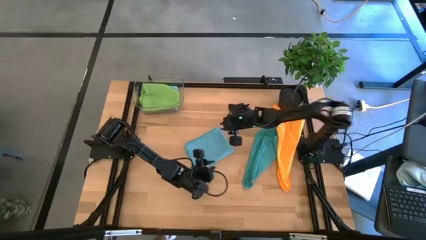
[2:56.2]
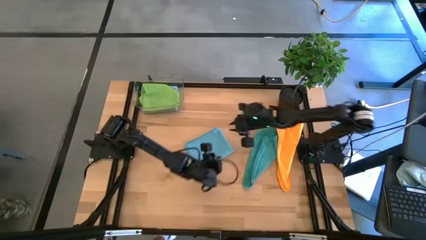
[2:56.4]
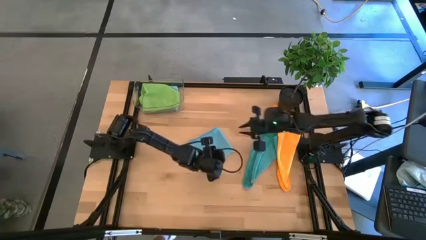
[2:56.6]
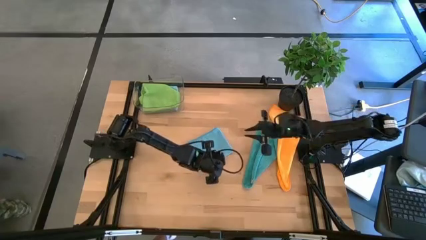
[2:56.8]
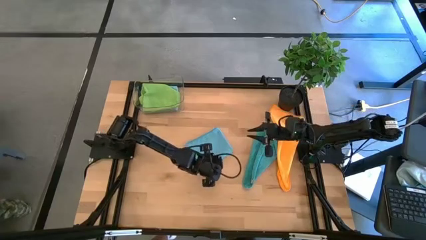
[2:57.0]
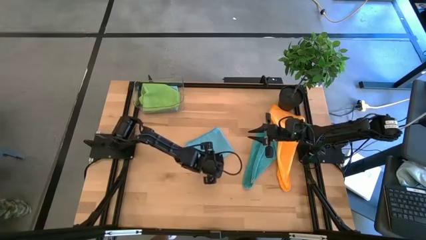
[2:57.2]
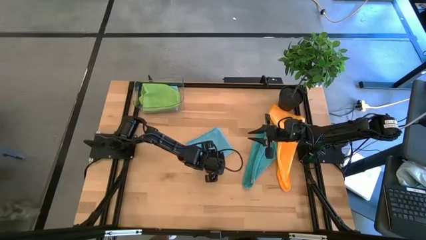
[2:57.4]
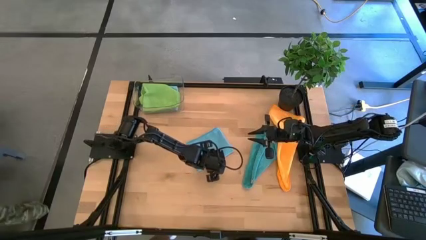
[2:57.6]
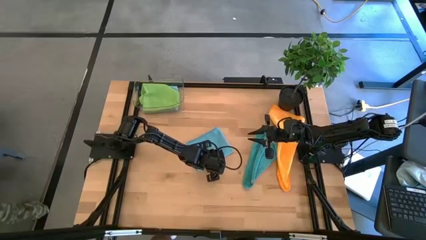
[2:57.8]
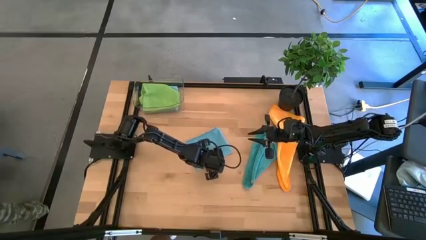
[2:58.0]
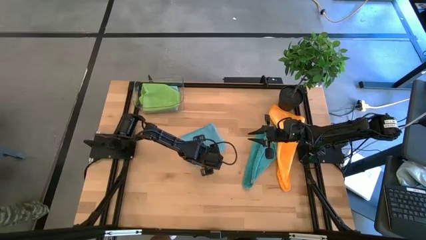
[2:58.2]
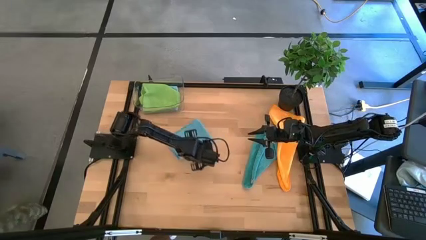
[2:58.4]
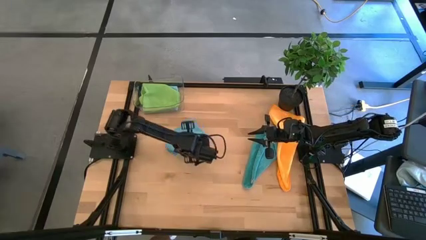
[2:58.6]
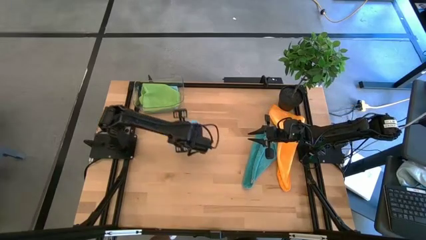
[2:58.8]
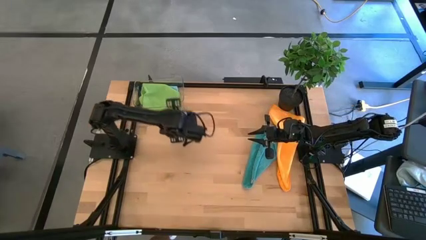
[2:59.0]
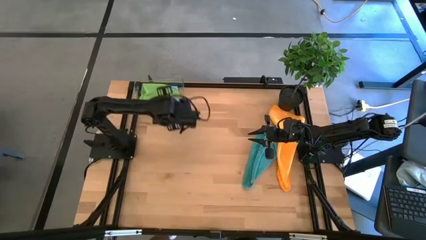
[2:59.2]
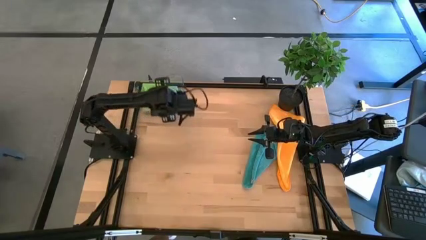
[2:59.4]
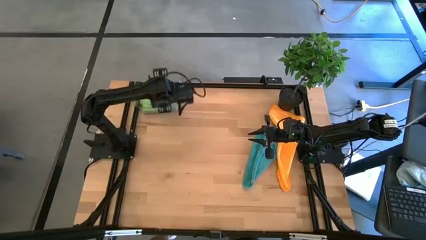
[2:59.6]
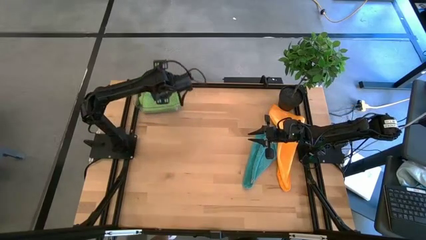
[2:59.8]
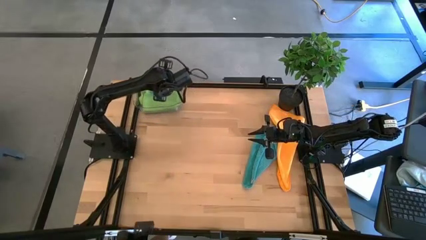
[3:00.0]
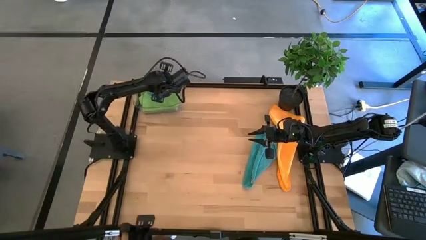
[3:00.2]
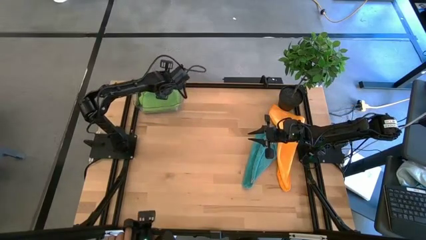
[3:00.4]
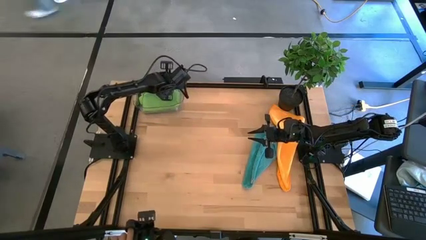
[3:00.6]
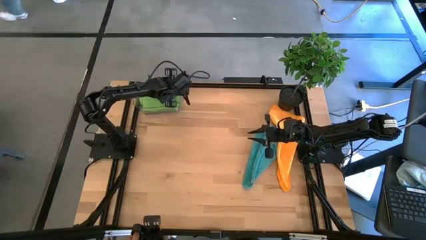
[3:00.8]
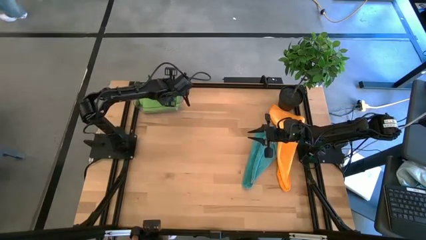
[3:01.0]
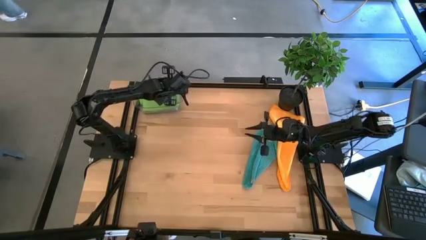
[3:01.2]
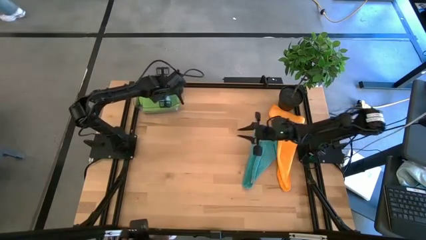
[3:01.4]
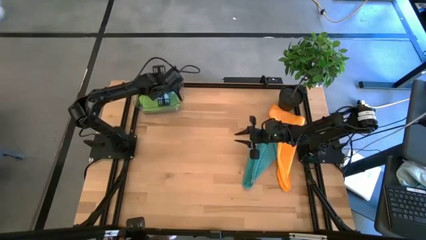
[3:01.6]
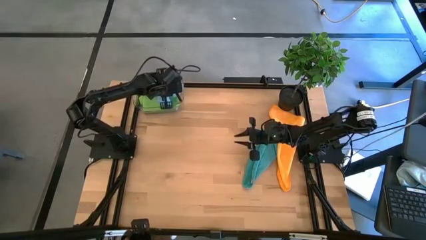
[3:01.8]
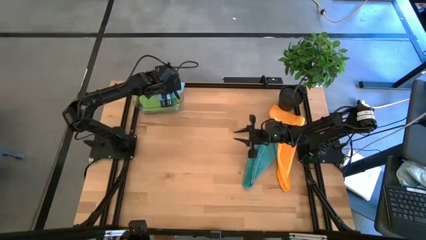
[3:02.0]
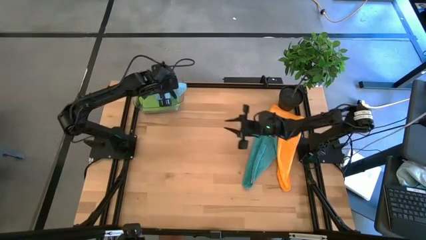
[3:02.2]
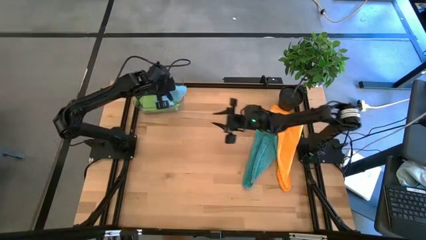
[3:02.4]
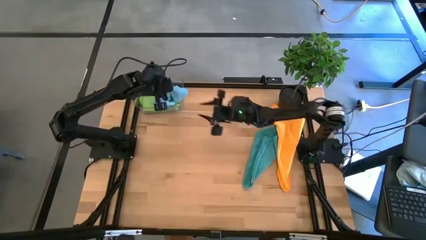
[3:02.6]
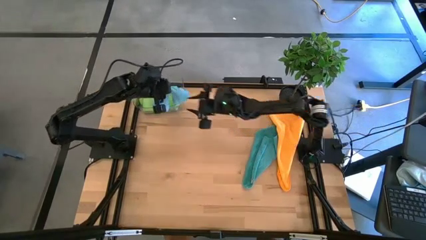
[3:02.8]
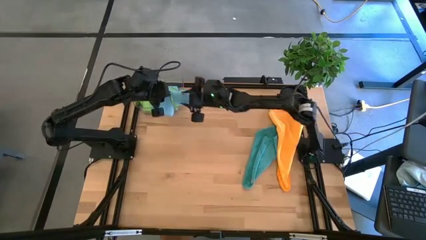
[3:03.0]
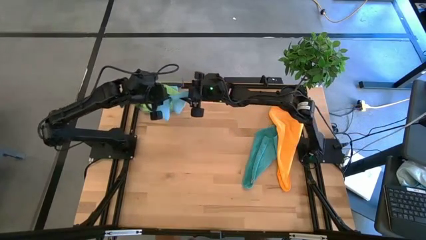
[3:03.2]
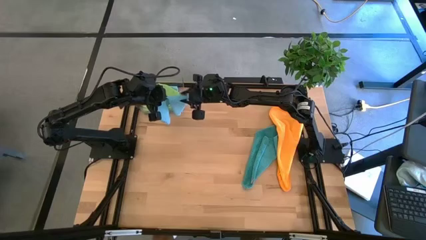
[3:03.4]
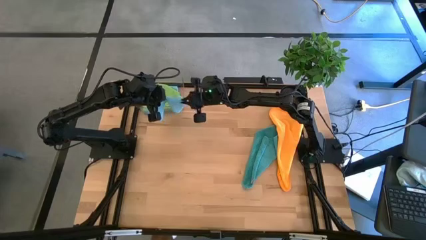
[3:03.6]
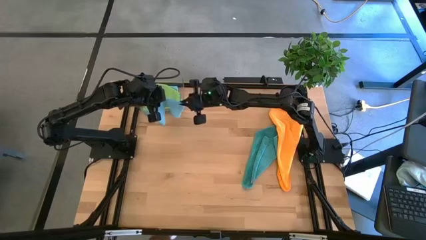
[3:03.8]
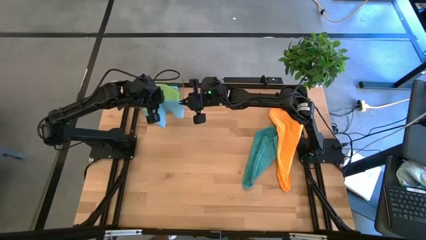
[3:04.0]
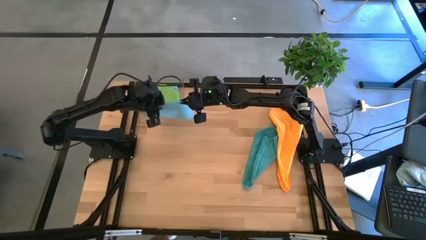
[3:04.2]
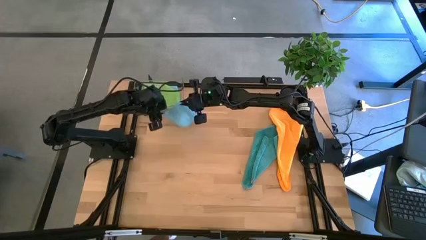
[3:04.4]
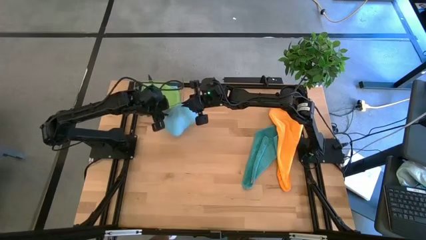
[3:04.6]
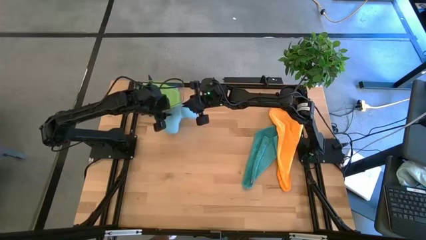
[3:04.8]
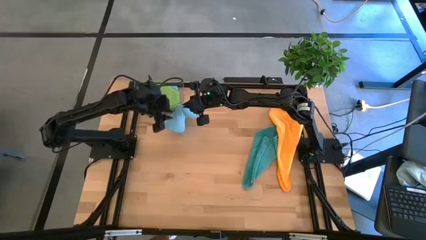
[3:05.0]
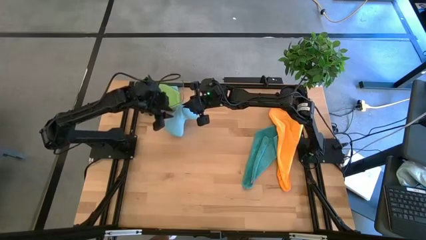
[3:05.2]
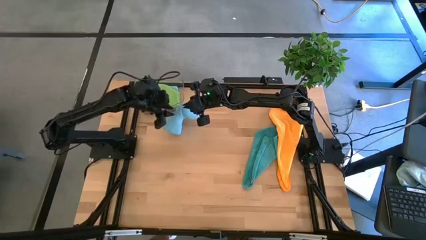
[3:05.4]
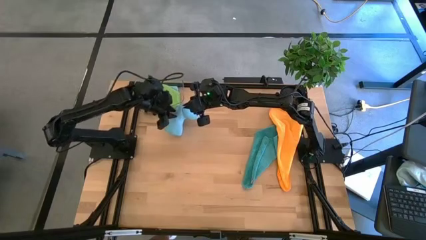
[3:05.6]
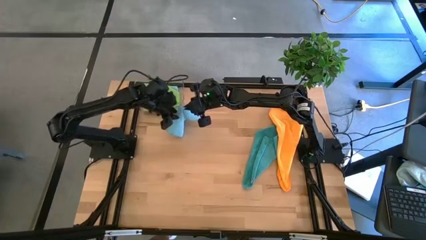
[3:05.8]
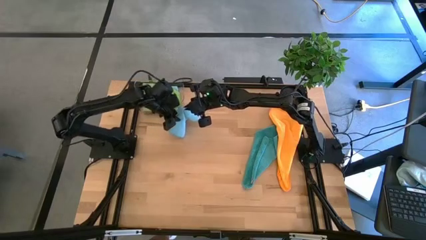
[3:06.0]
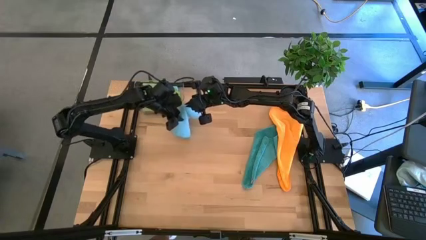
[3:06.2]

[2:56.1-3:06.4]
Task: Fold microfiber towels
Stack the light blue microfiber cloth on top of the green microfiber cloth in the transparent bin

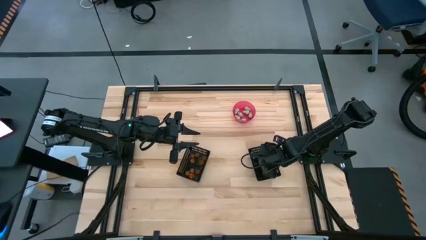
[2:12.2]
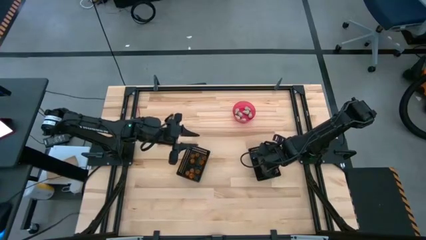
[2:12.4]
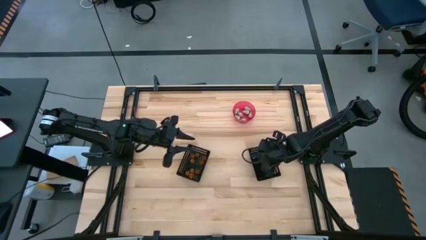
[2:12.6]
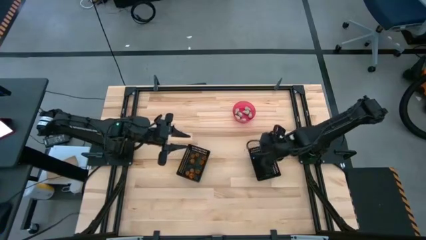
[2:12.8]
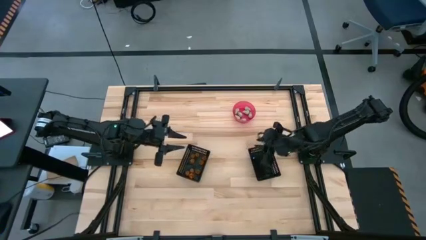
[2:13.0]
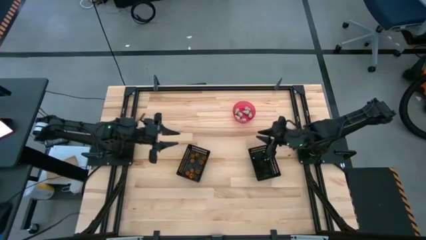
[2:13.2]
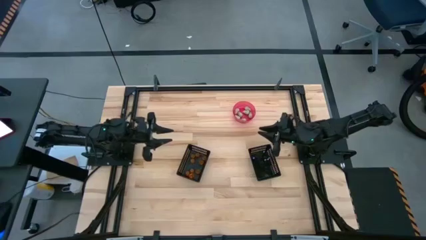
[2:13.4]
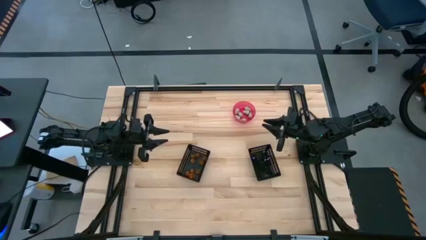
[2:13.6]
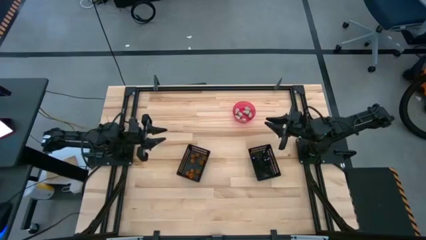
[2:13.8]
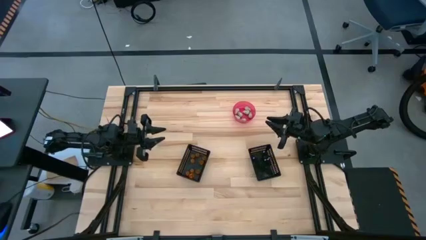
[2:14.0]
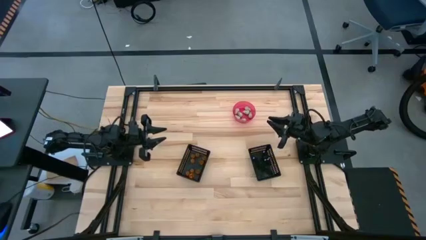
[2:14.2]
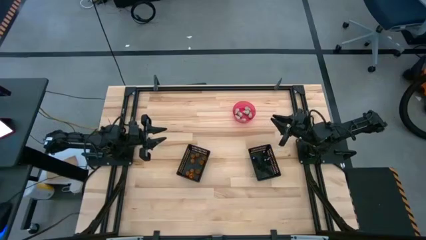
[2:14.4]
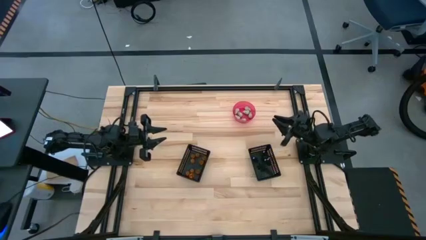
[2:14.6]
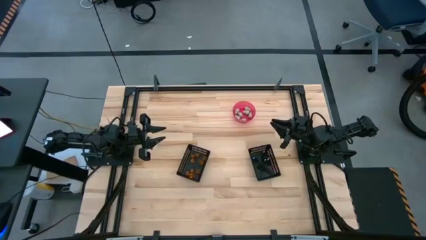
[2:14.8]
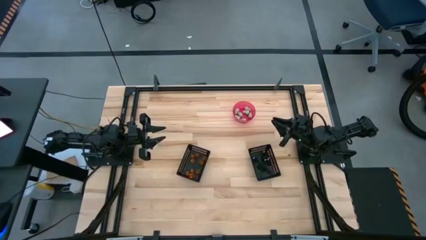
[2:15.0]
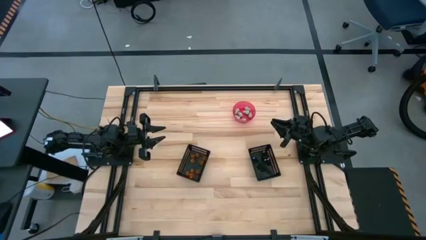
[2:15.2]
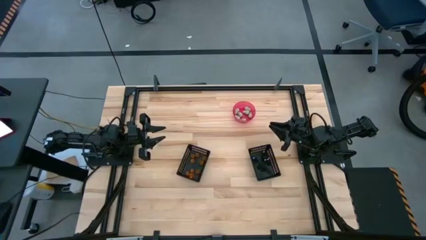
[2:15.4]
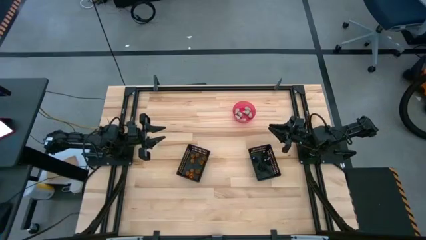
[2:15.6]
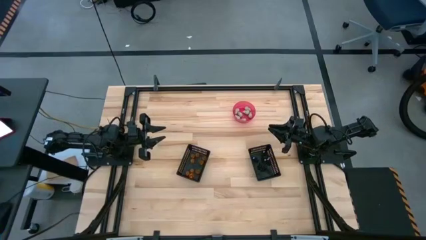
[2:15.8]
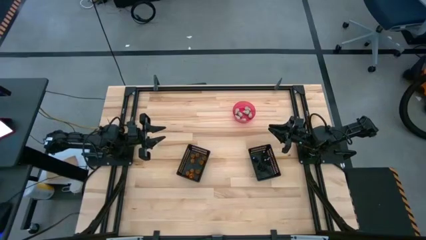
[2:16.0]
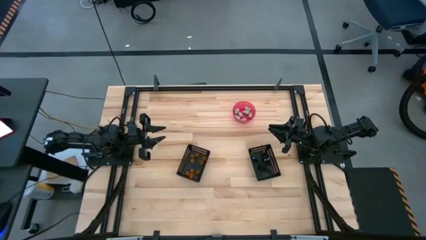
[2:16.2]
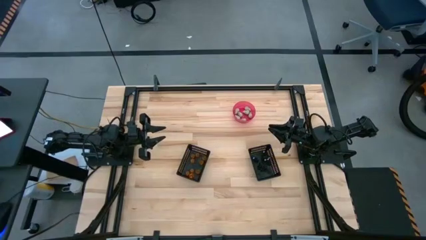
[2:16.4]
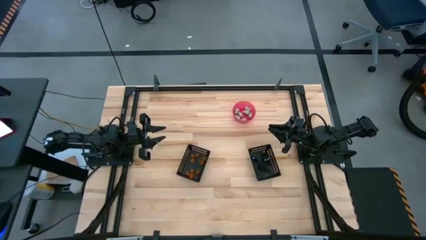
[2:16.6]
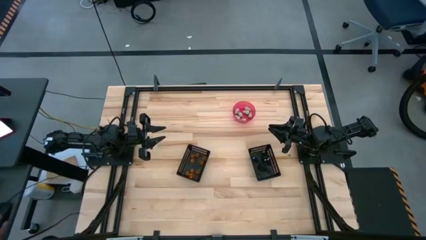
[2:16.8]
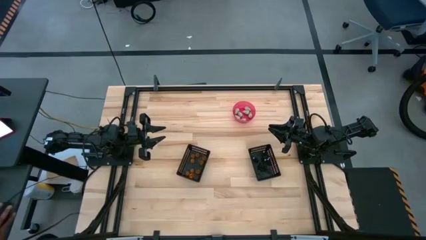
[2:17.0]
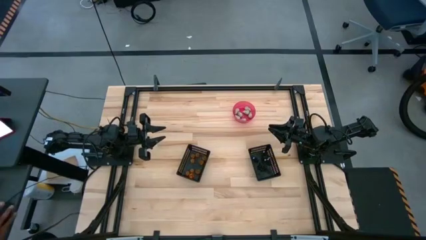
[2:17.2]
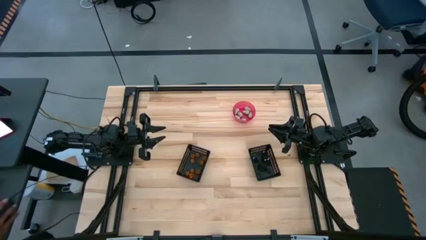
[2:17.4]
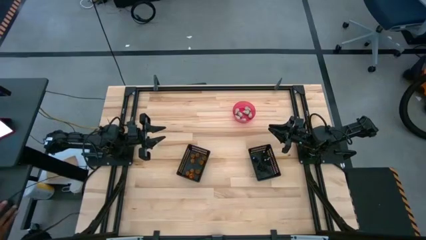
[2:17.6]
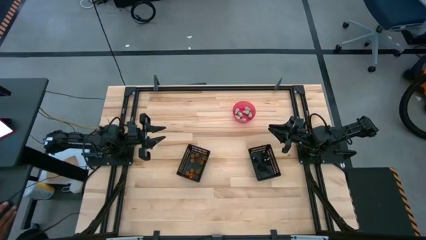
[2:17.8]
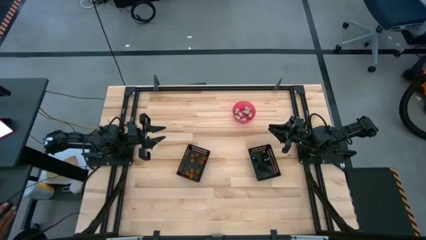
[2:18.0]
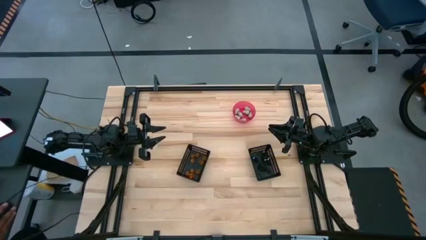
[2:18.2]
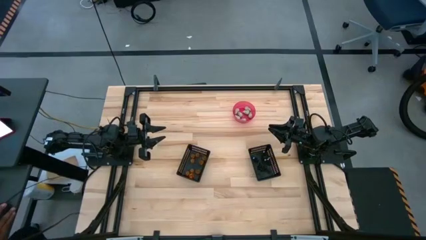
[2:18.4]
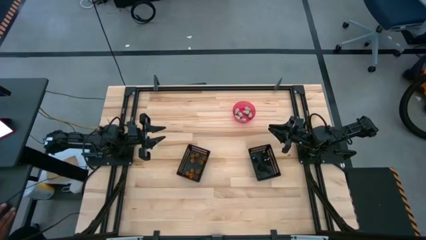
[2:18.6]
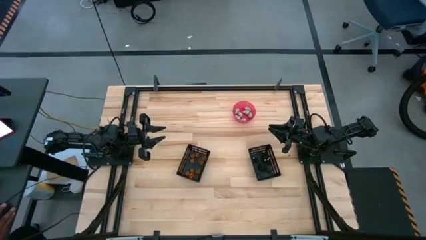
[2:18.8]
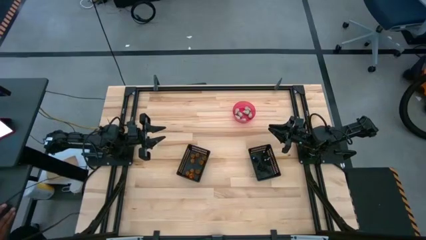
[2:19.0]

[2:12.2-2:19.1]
Task: Sort Halloween decoration
Return to Home Position
